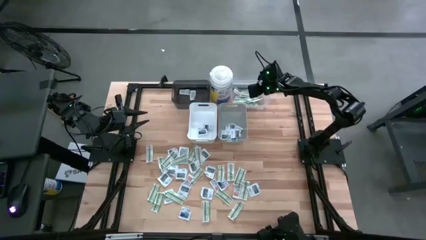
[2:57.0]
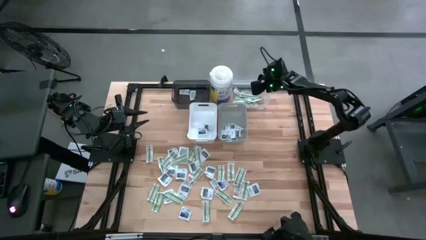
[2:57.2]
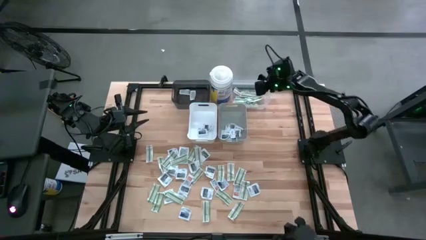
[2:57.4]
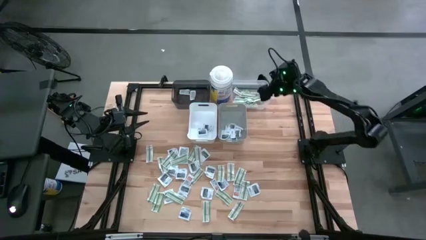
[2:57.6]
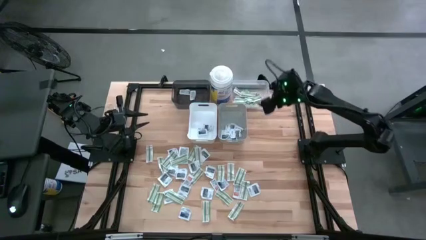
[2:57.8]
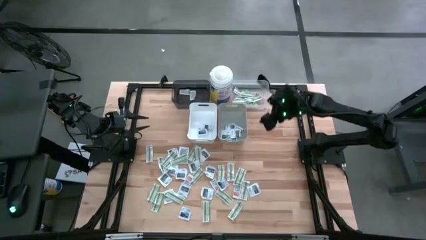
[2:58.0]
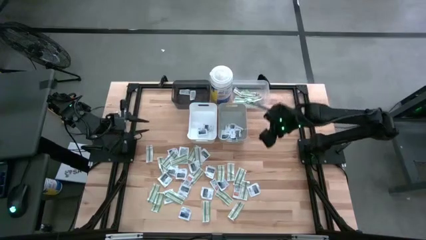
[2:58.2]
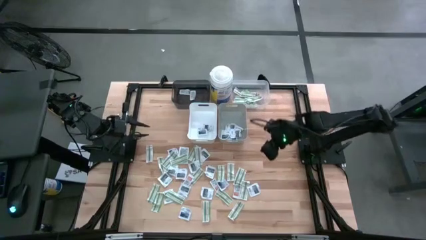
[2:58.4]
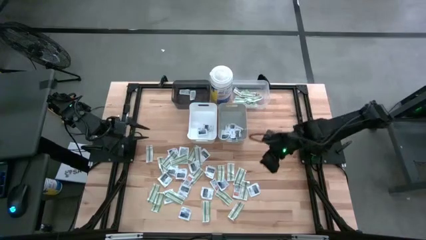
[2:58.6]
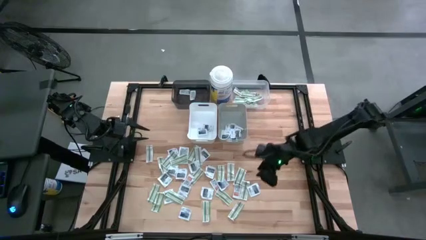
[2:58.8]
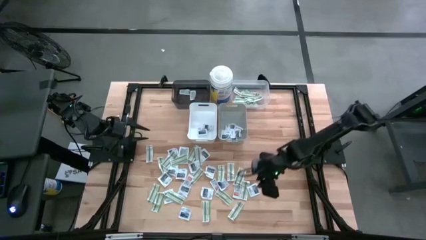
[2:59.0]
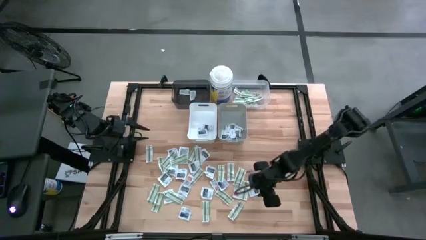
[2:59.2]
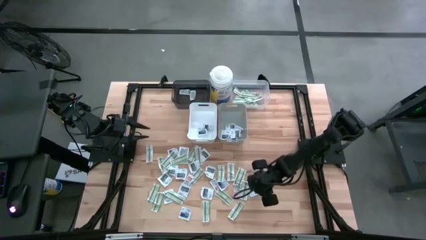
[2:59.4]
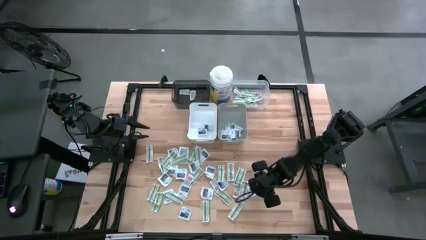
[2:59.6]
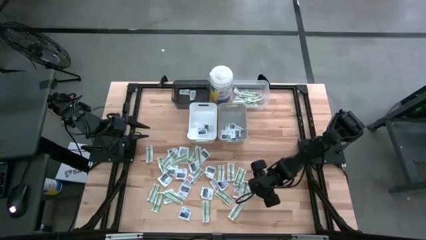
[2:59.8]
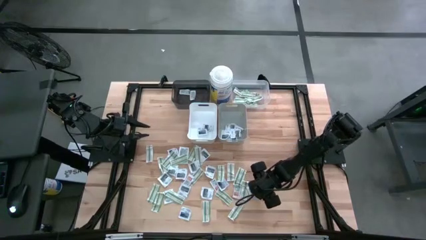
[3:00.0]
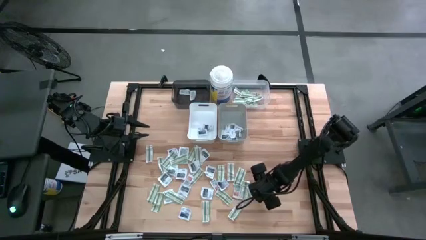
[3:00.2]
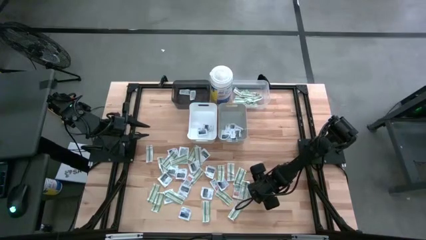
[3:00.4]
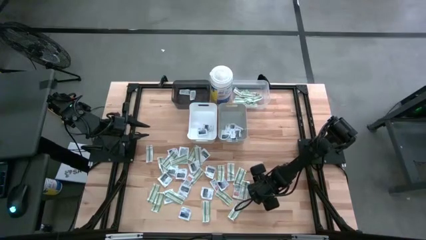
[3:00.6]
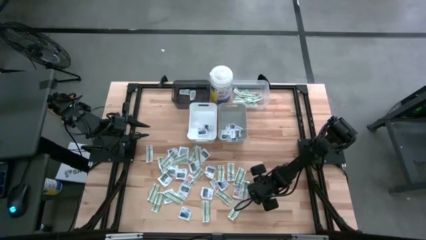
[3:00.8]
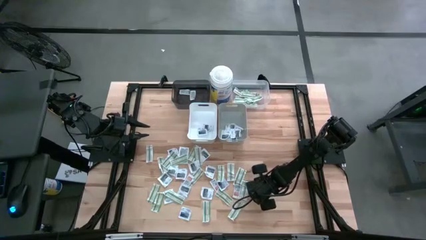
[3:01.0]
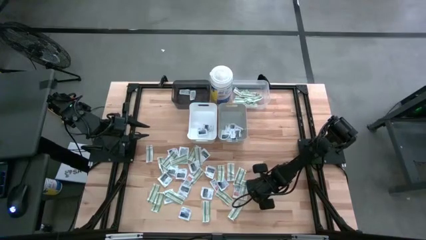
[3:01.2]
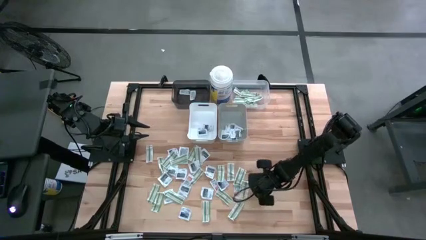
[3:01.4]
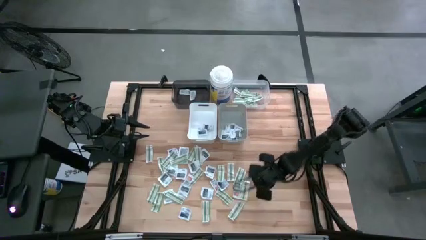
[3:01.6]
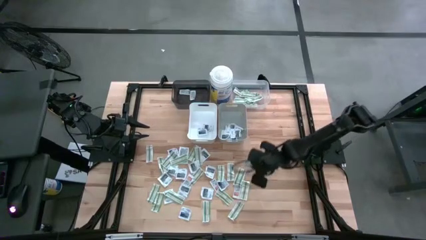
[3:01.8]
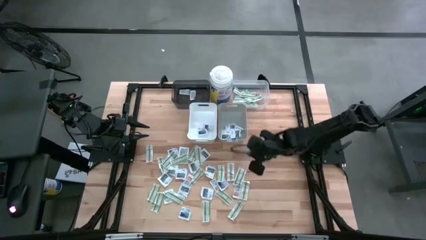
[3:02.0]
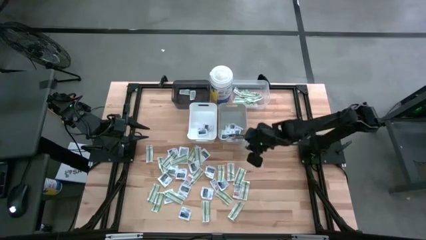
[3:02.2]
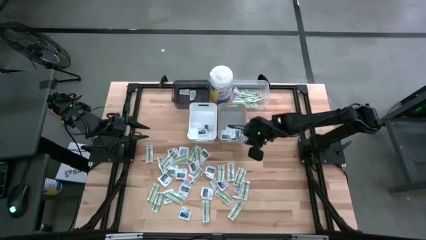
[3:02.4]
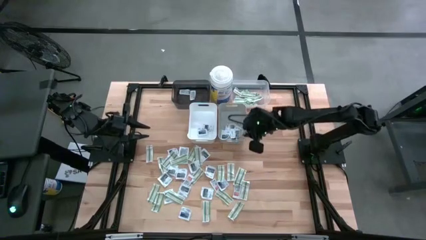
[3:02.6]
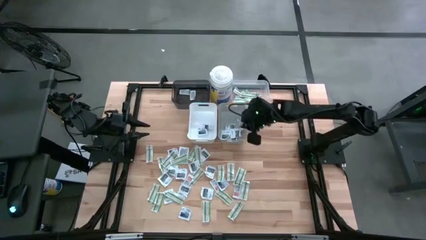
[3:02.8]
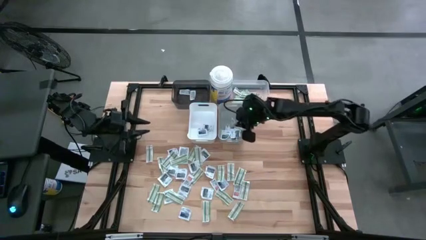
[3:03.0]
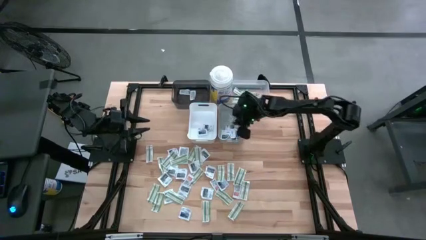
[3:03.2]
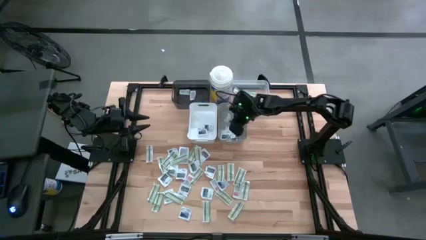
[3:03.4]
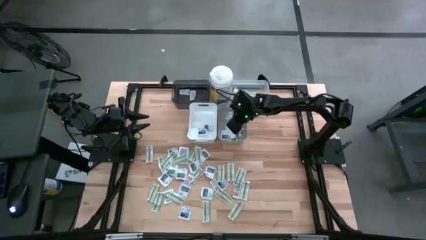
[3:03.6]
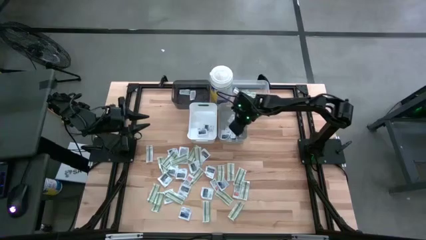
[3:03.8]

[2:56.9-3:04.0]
Task: Pick & Place First Aid Supplies
Put the wipe into the gray bin

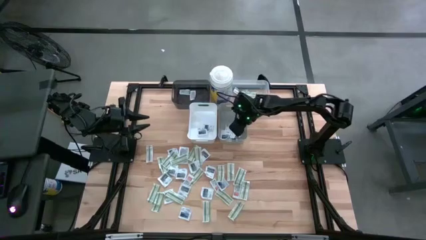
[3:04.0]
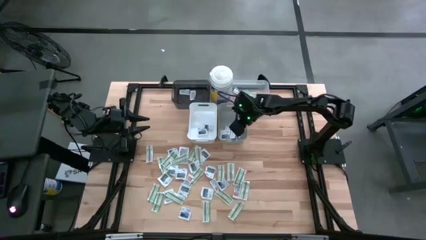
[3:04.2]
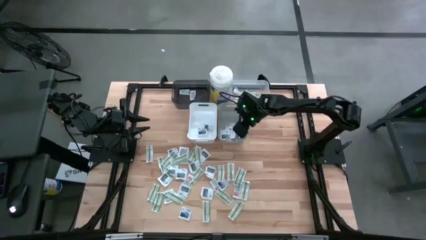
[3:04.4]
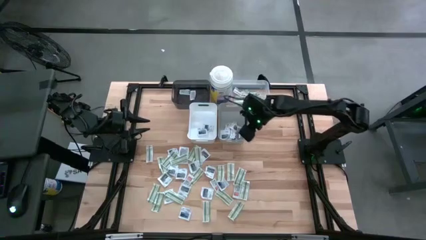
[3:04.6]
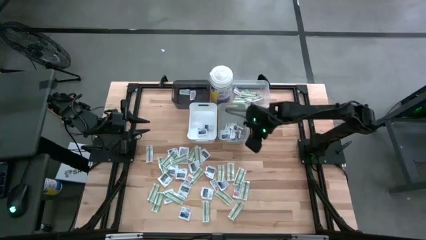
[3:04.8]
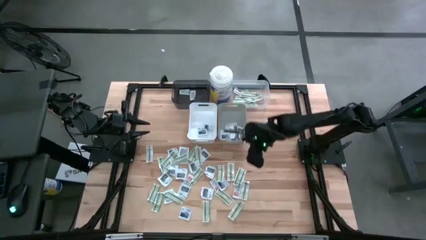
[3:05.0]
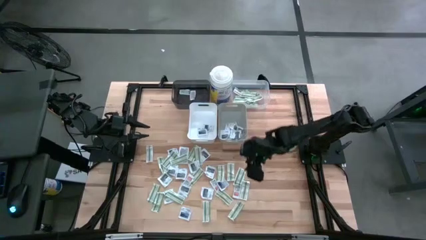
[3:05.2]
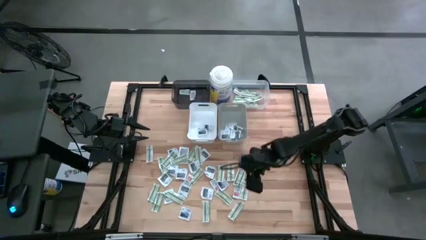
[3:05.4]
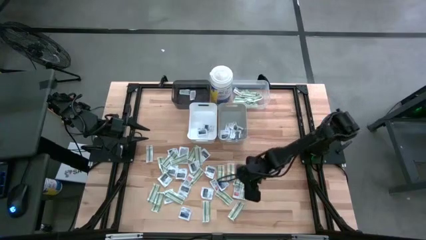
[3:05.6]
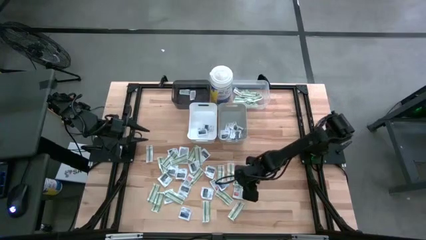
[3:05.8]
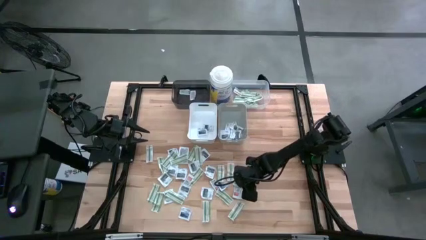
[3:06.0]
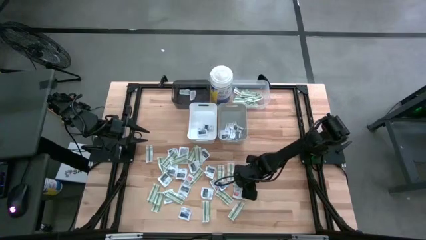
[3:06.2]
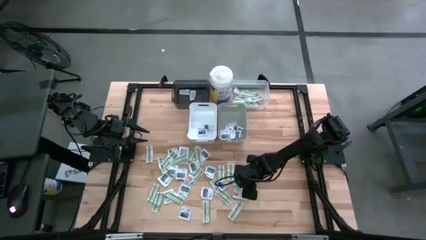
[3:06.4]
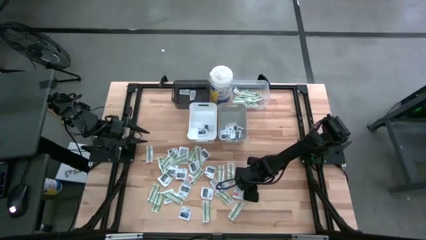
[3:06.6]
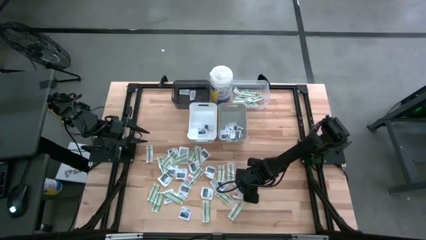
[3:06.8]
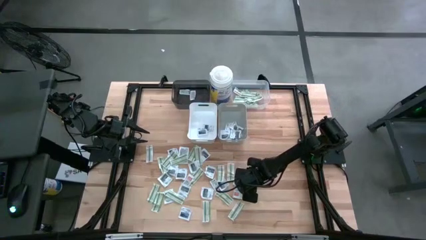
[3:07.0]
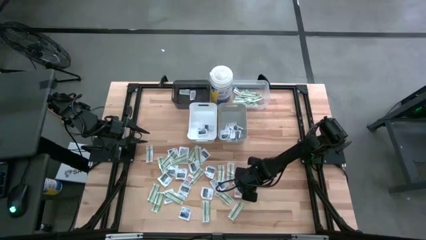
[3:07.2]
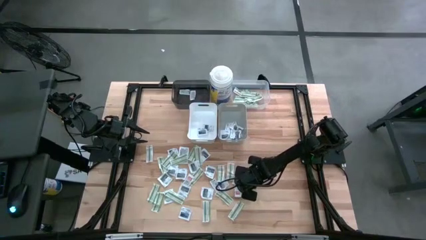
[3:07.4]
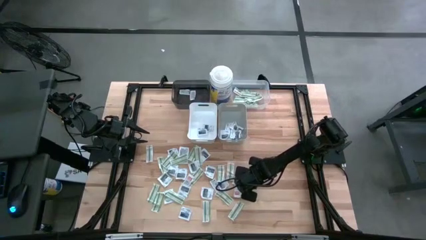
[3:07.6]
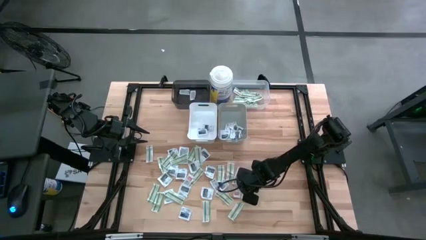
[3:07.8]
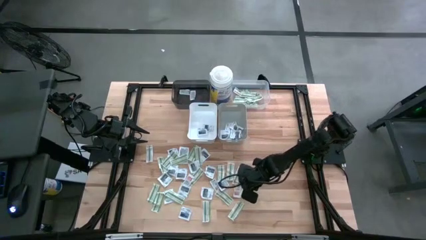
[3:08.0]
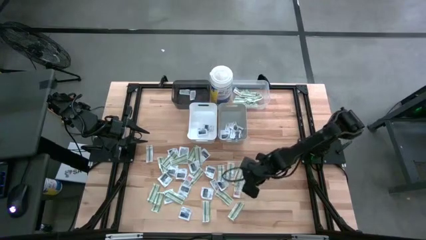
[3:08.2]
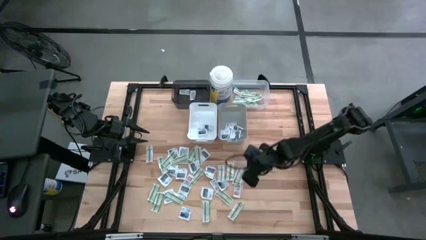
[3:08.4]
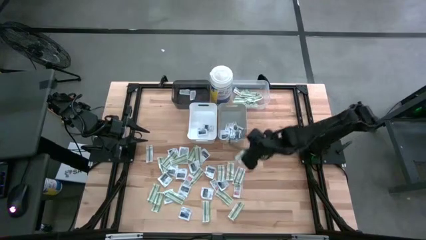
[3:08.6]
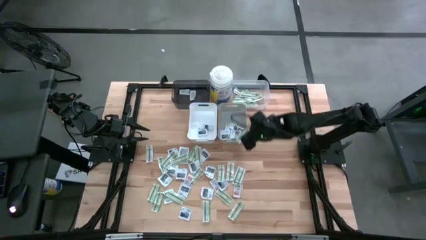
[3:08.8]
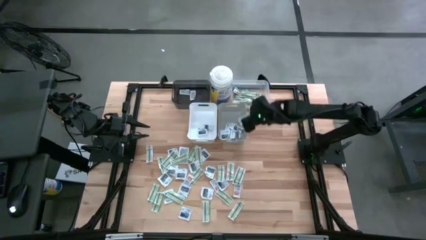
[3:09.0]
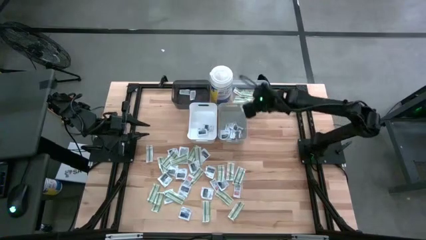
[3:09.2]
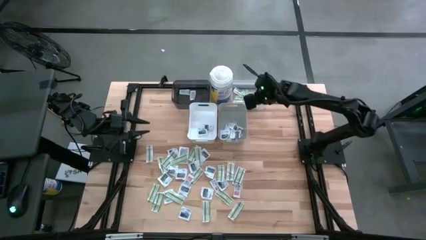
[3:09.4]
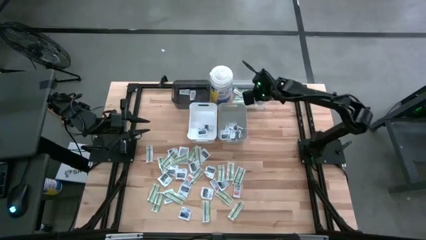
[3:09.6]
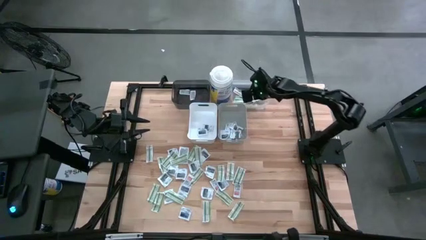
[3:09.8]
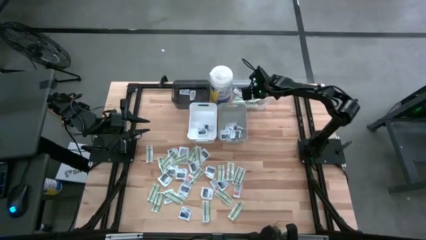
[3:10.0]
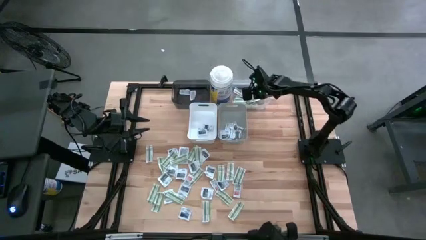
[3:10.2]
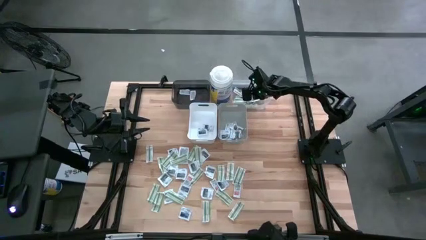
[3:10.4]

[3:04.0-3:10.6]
Put the band aid into the transparent bin
